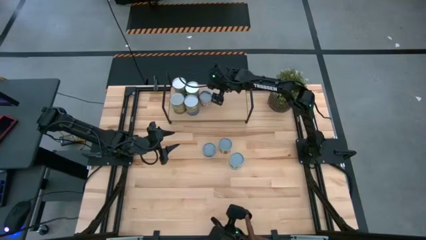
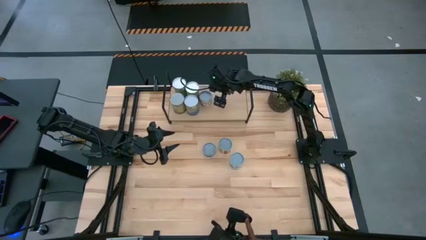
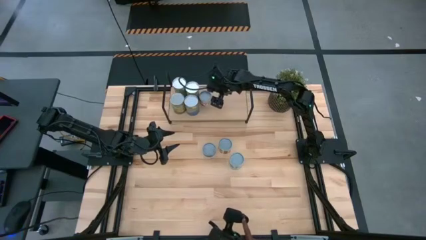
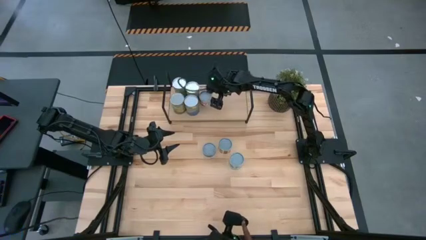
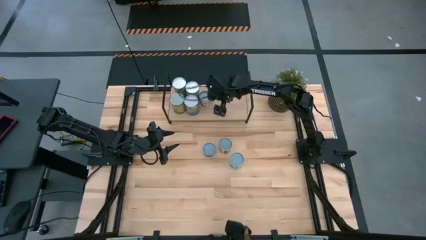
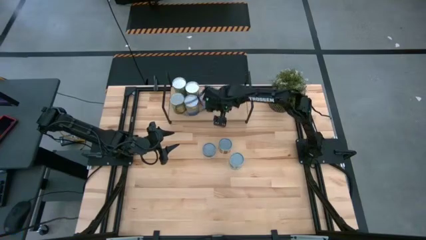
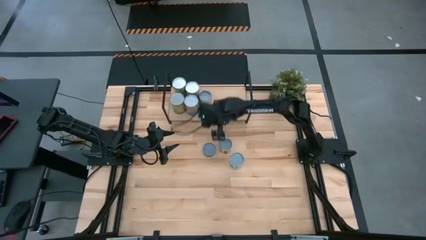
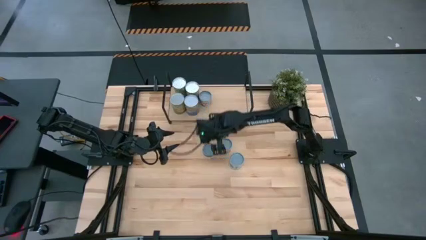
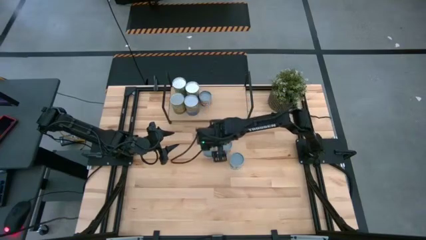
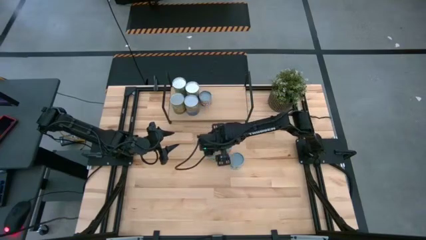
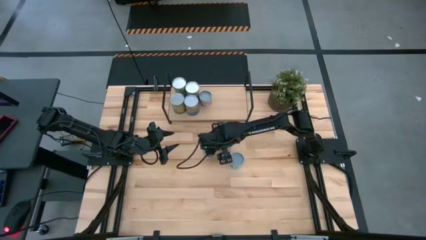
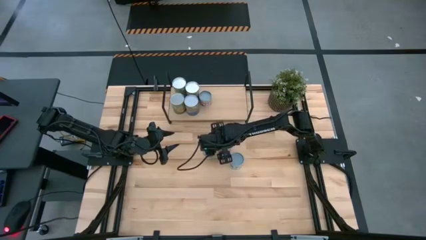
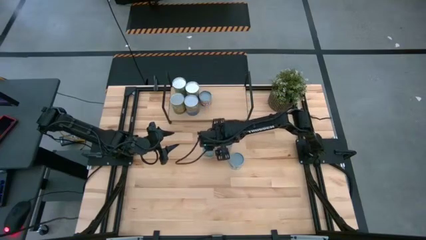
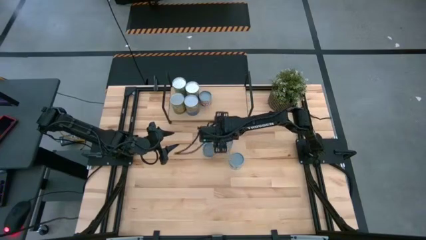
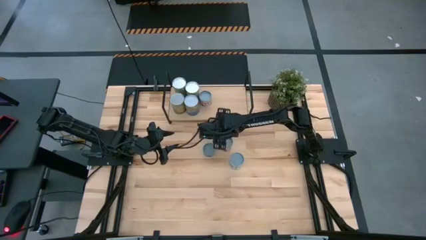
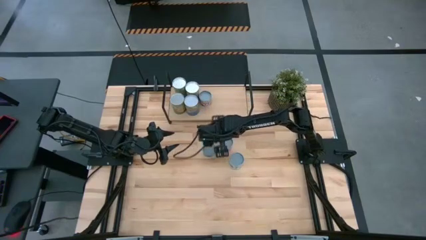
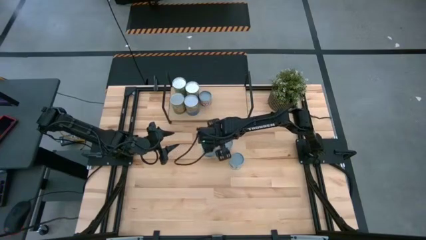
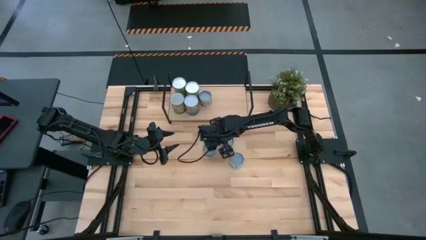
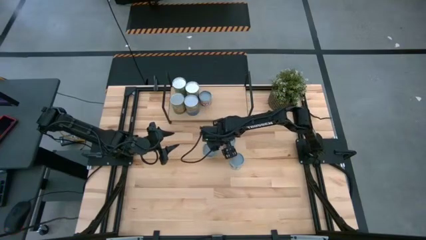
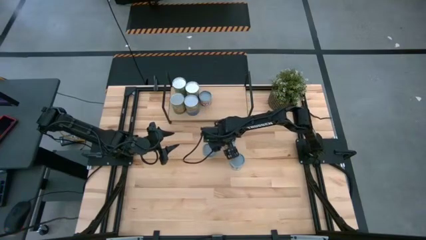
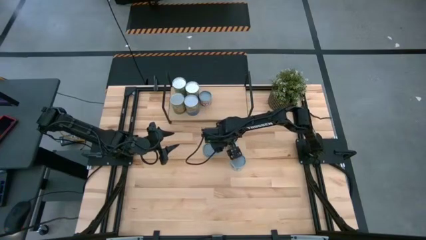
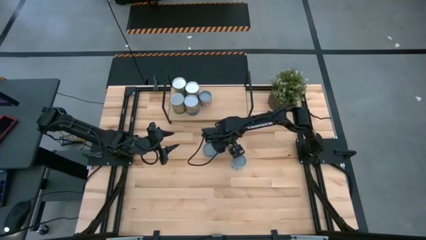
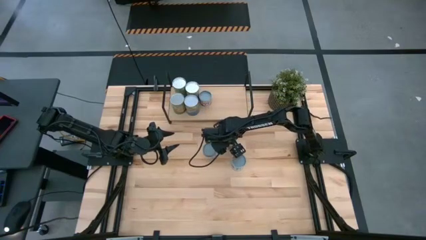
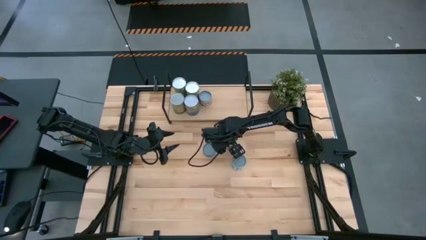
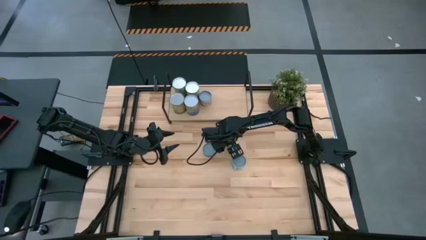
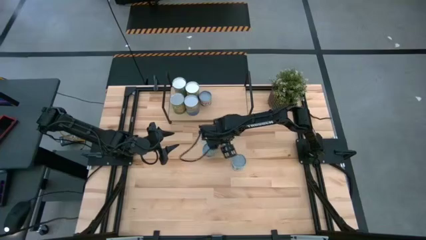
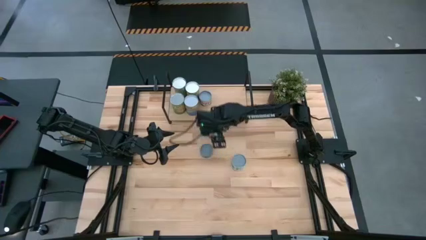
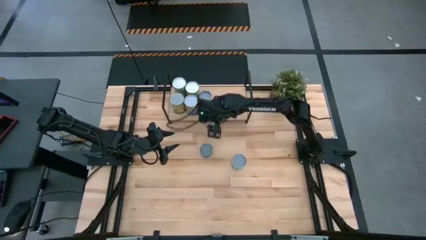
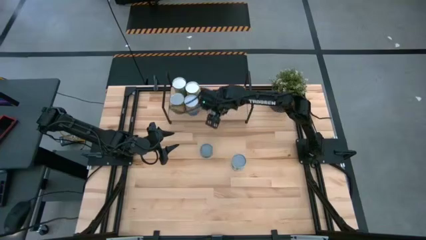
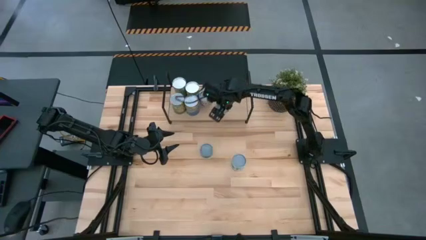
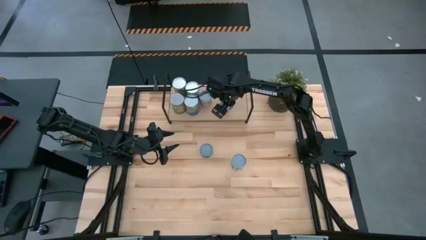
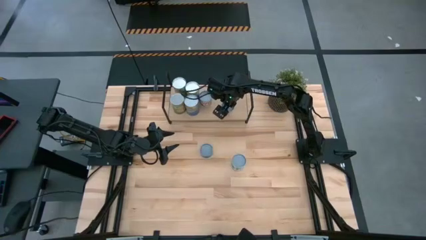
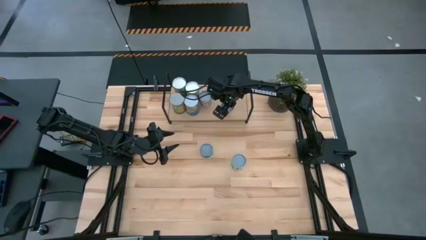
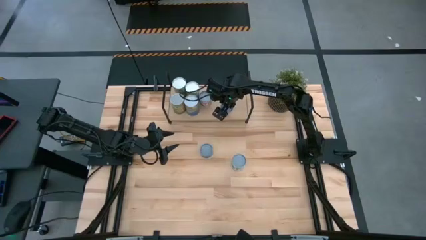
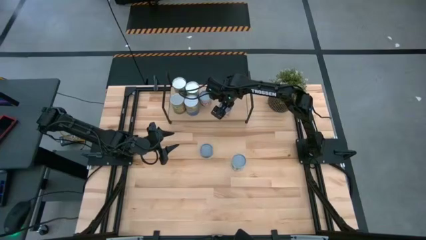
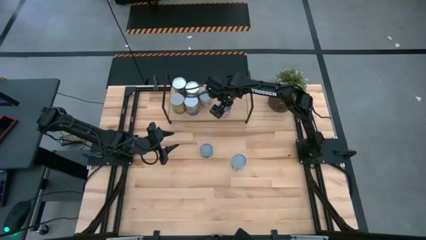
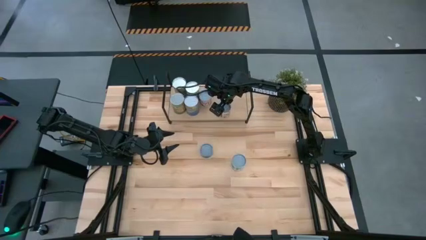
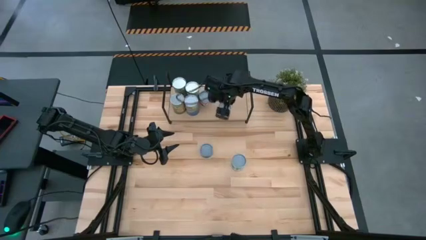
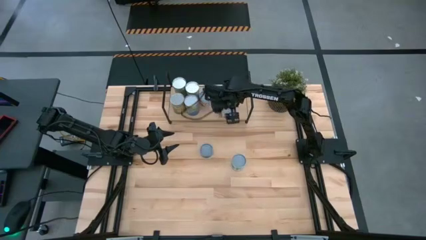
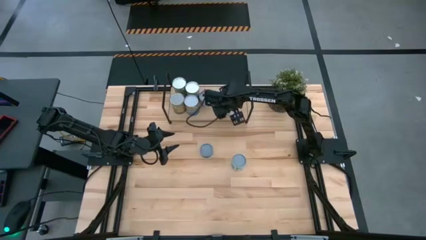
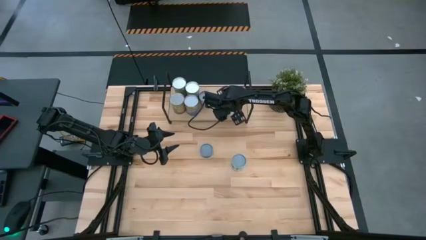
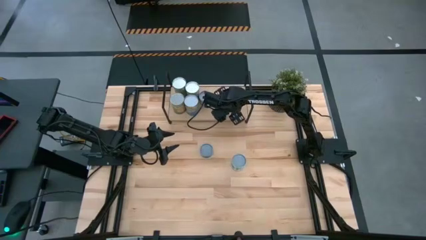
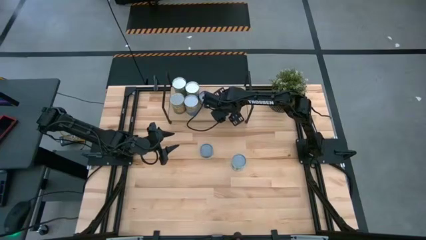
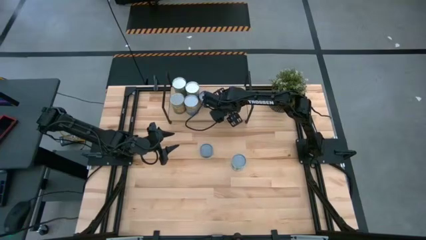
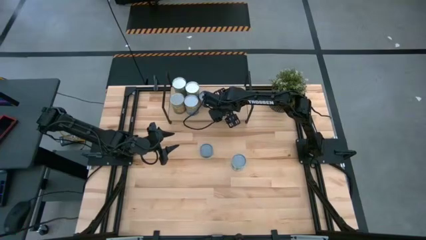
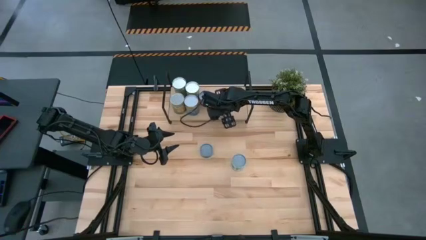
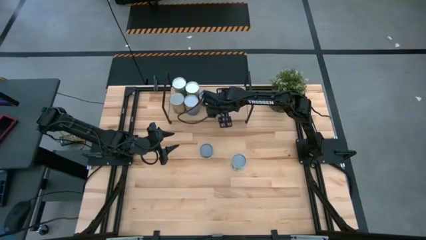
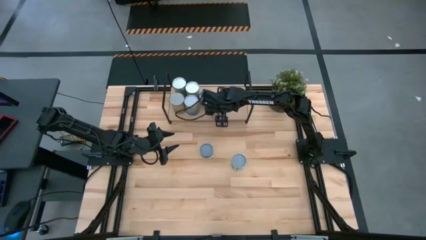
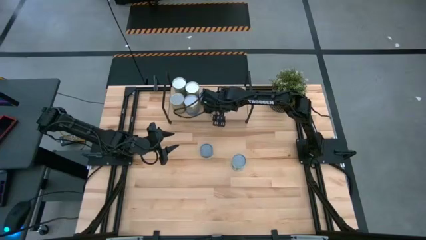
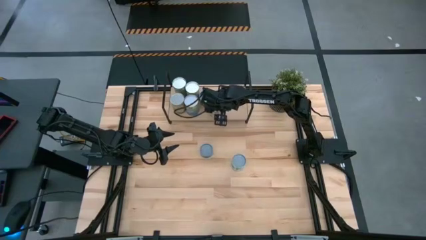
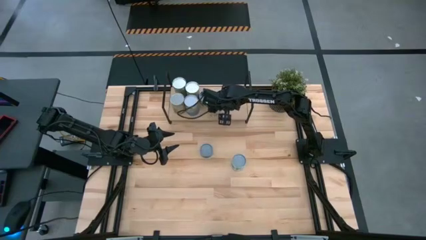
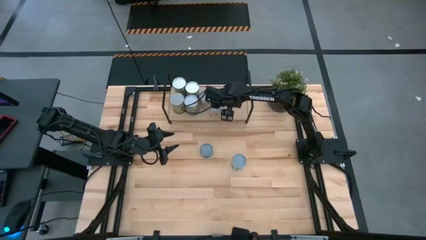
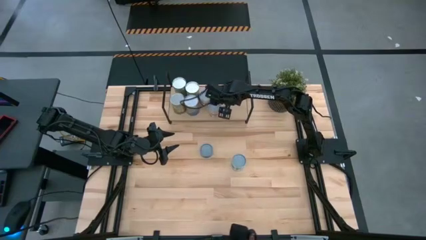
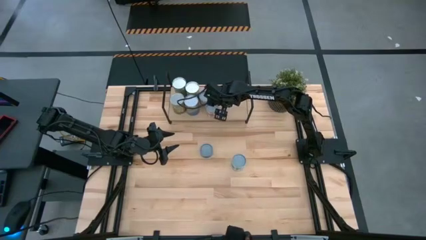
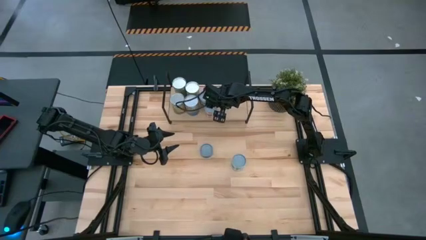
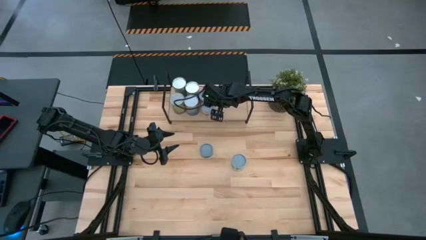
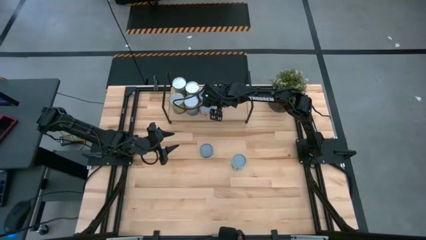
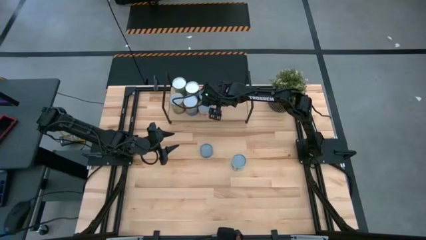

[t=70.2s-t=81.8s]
Task: Pick and place cans onto a shelf
Put the canned tomatoes on the shelf
